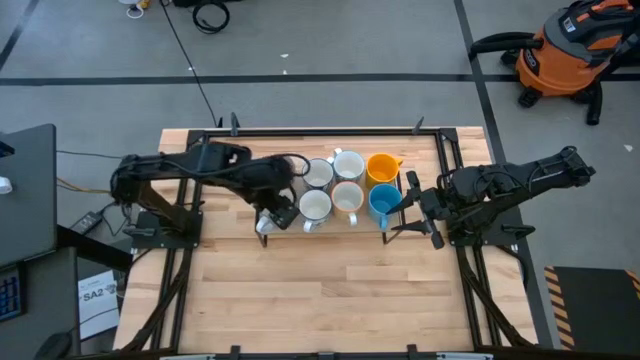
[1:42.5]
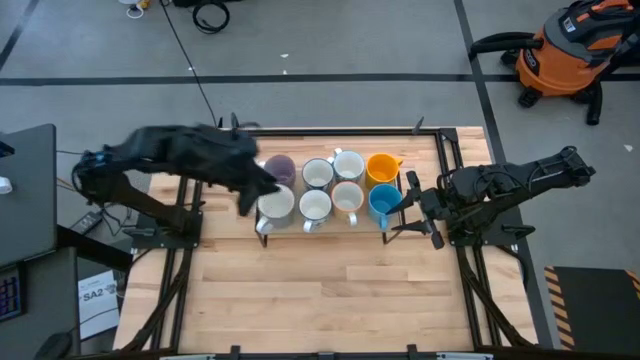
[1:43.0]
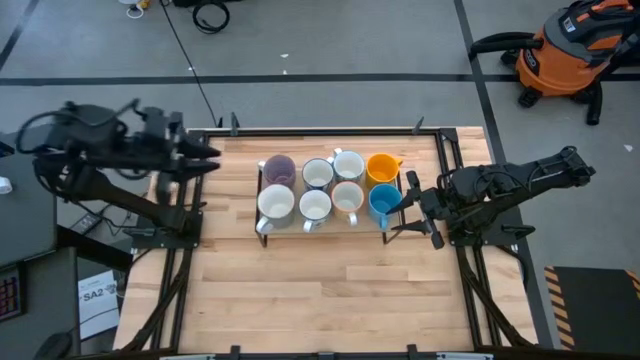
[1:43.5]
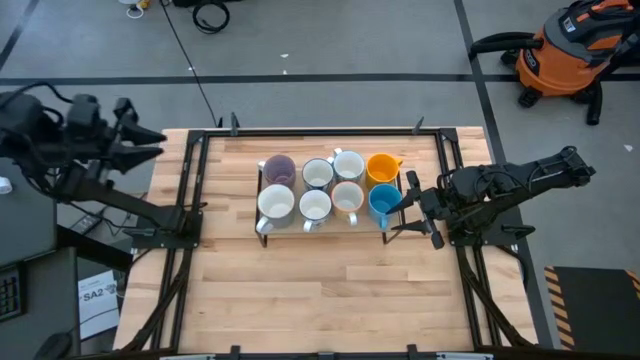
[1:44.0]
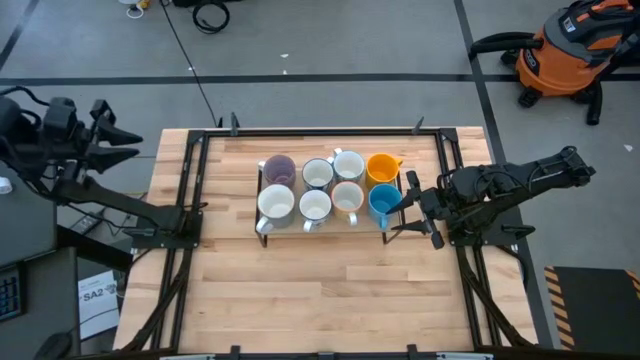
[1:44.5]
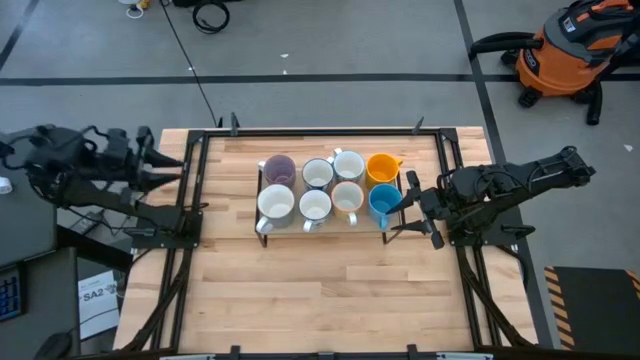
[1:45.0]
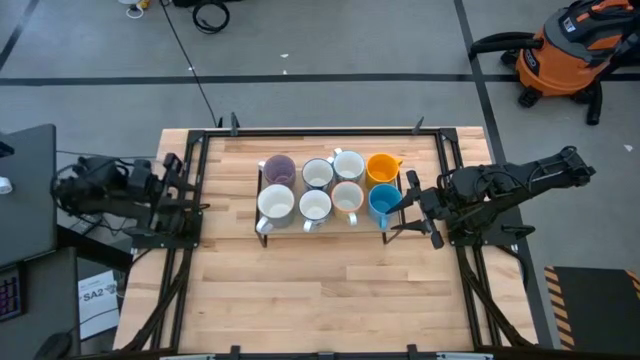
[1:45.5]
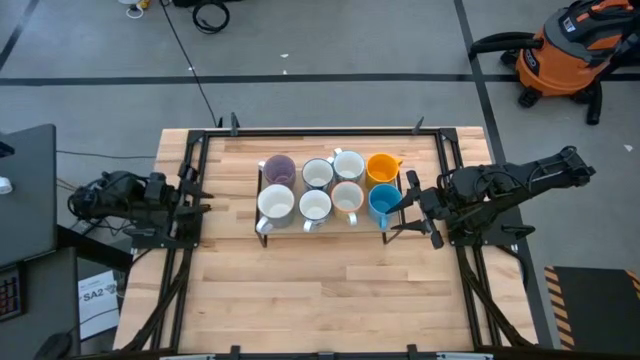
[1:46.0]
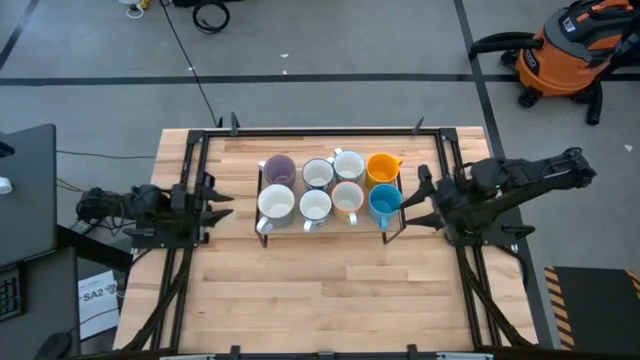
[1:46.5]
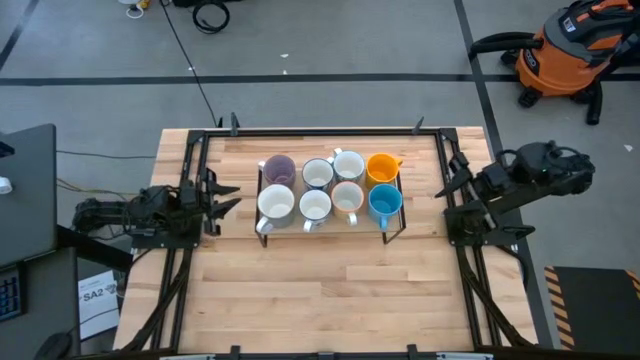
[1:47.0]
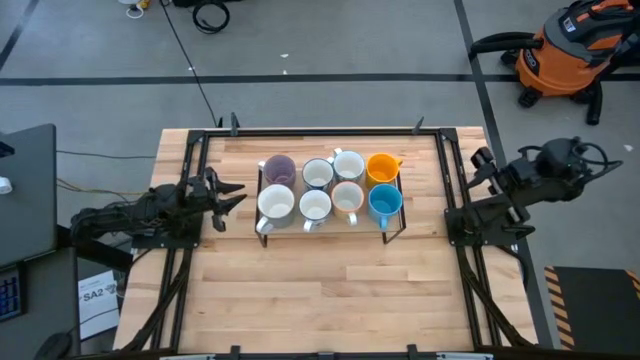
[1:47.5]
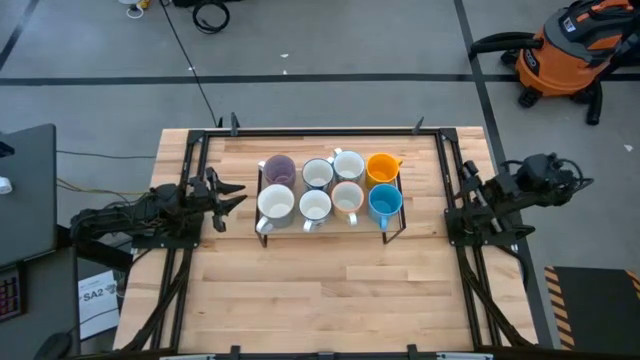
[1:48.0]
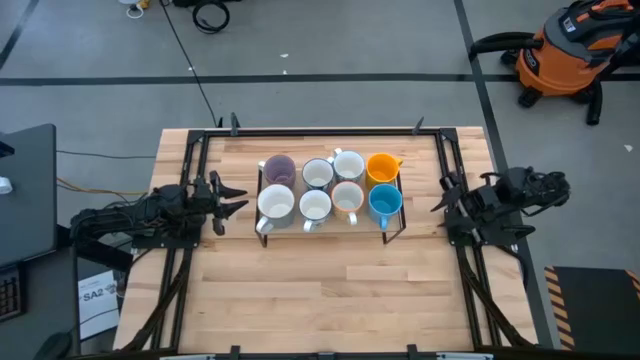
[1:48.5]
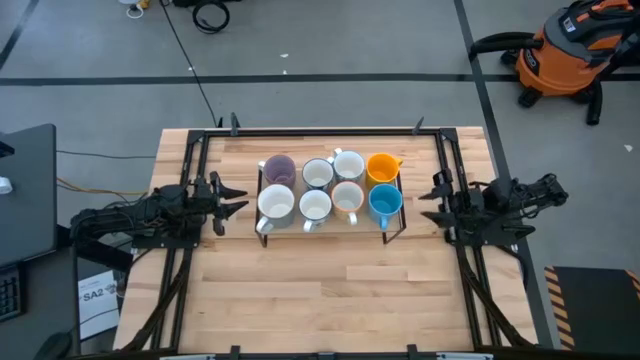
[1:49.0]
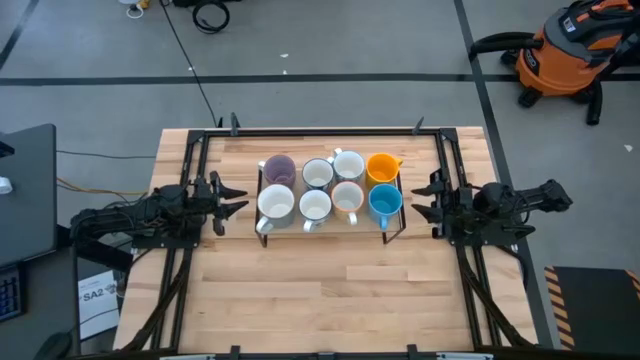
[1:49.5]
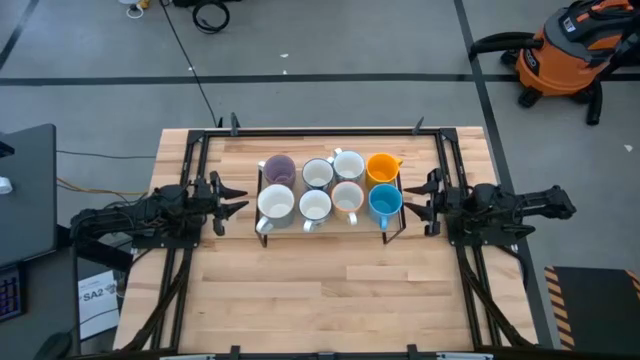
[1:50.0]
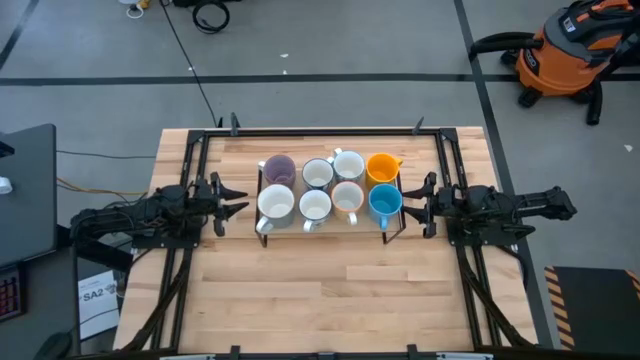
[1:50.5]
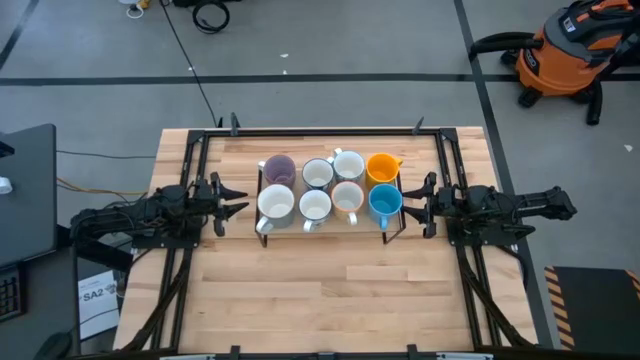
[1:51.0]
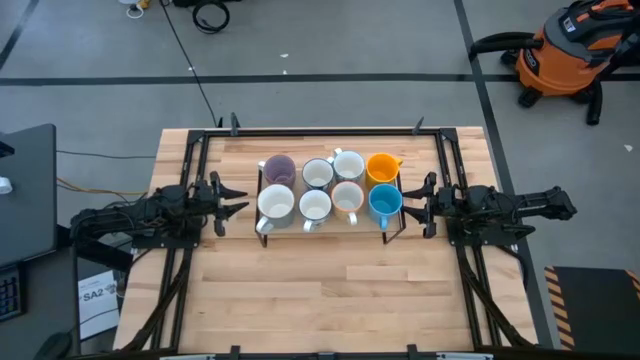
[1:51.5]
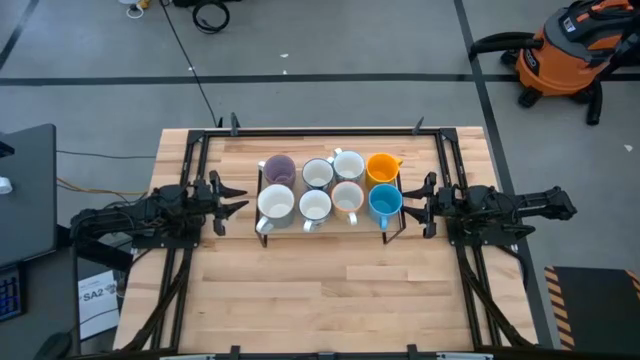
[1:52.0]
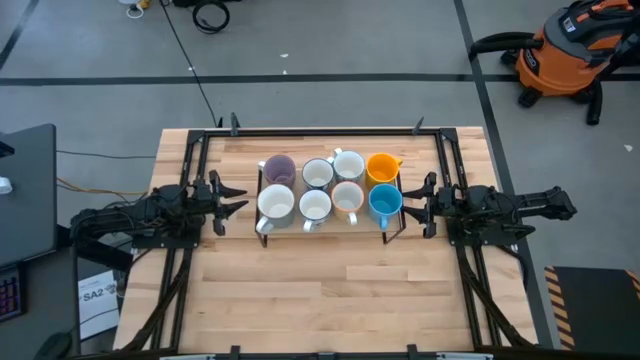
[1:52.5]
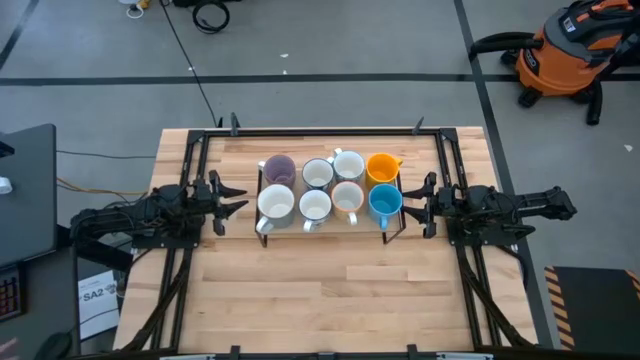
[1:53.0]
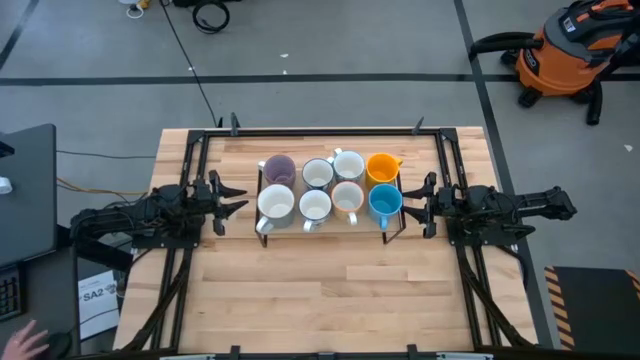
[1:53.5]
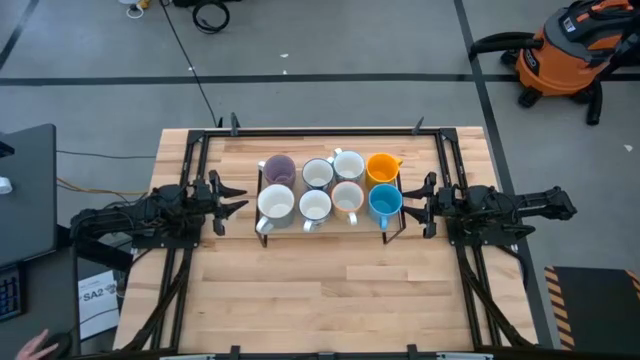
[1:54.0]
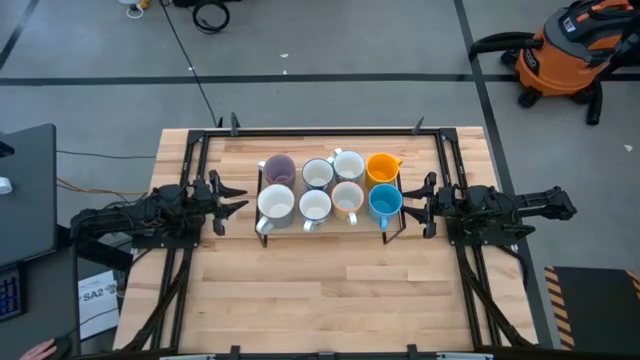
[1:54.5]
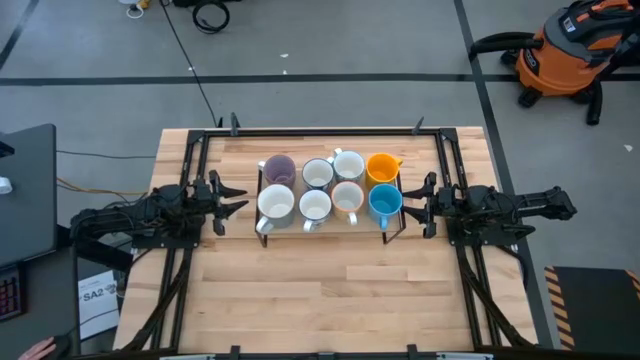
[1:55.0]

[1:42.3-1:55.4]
Task: Place coffee mugs
Return to Home Position

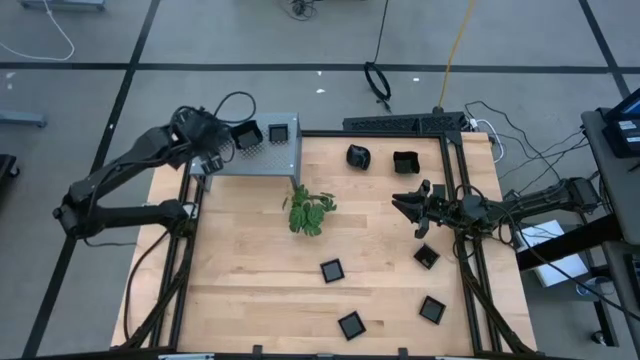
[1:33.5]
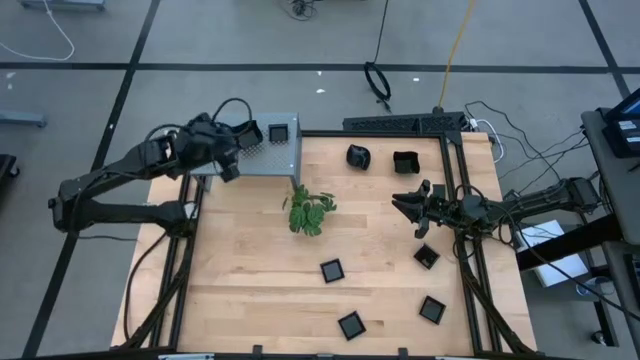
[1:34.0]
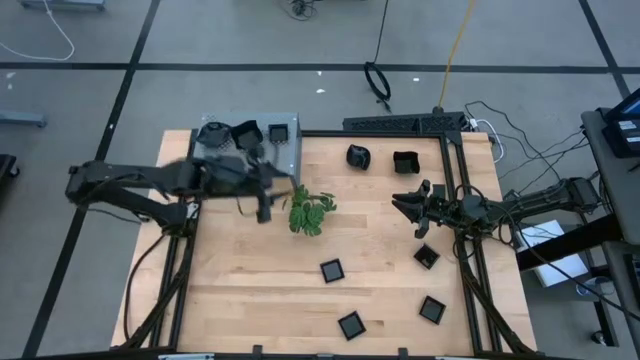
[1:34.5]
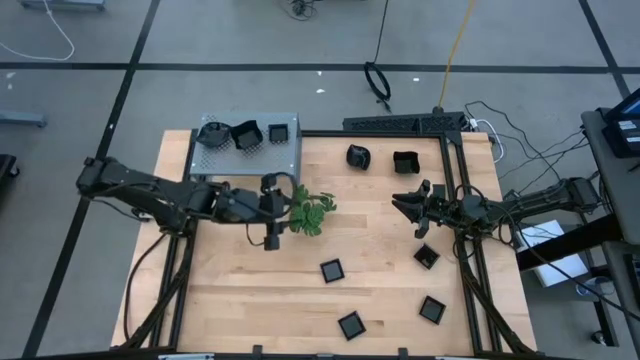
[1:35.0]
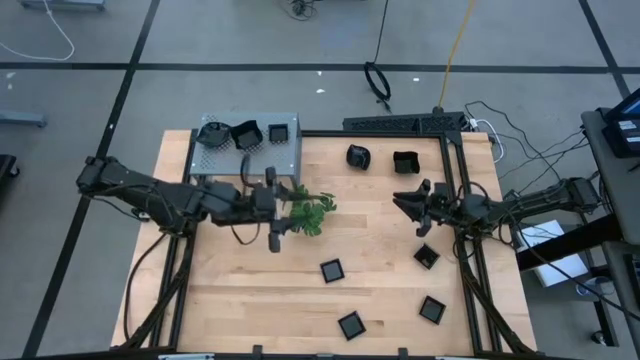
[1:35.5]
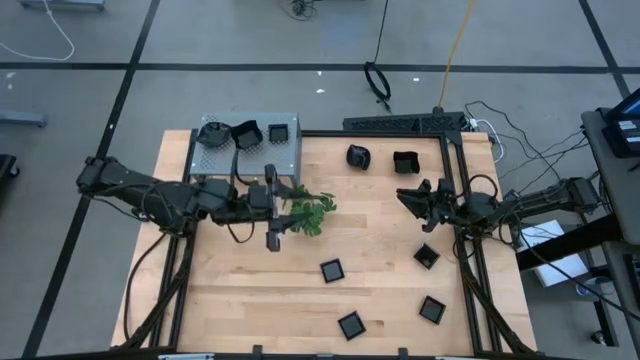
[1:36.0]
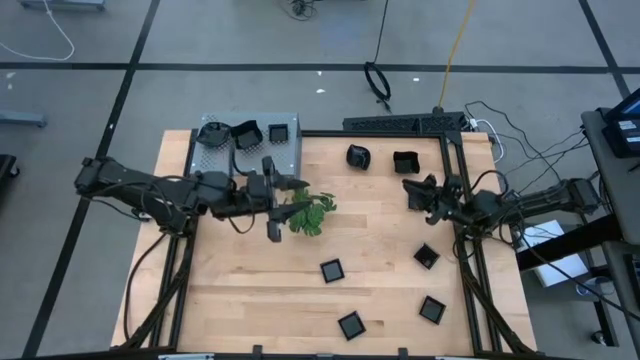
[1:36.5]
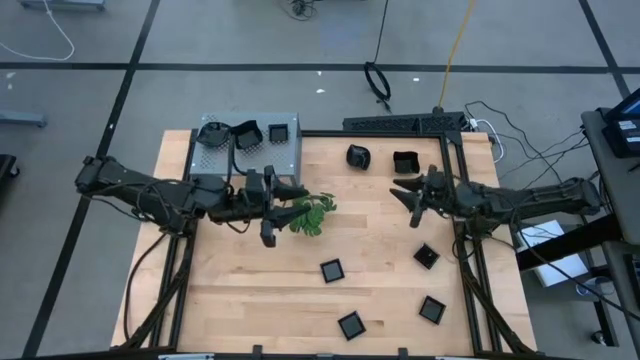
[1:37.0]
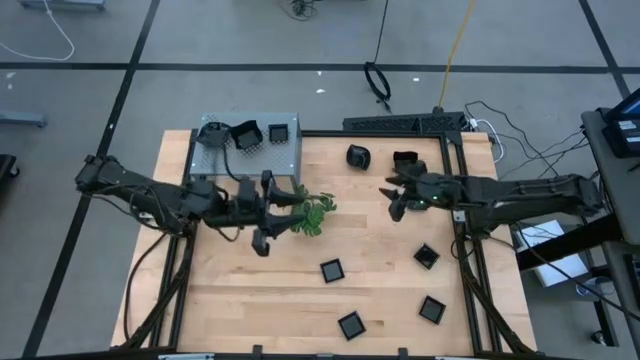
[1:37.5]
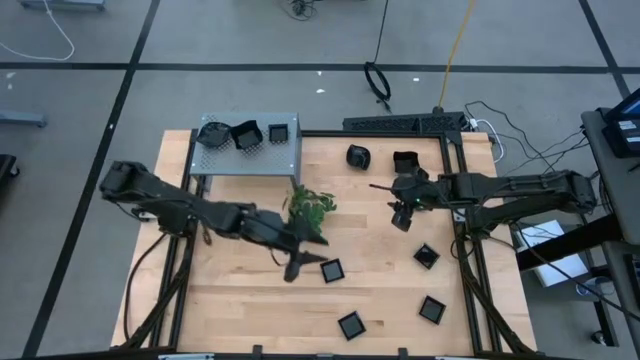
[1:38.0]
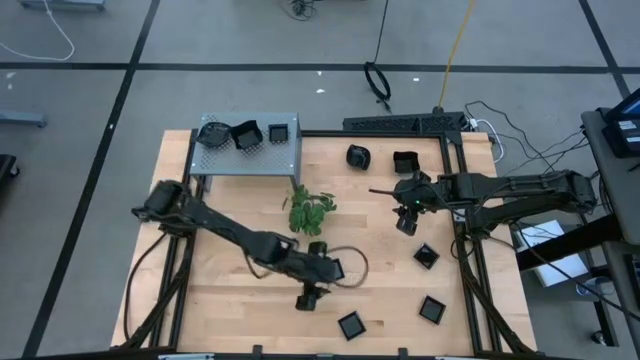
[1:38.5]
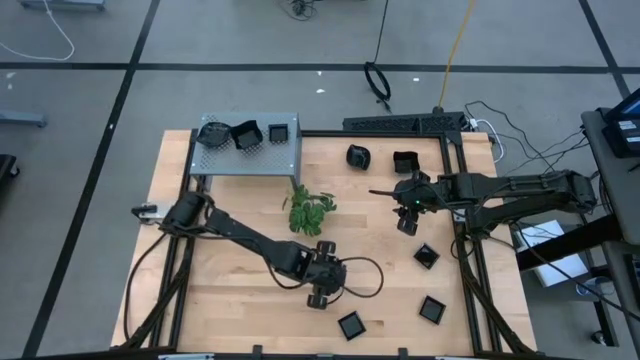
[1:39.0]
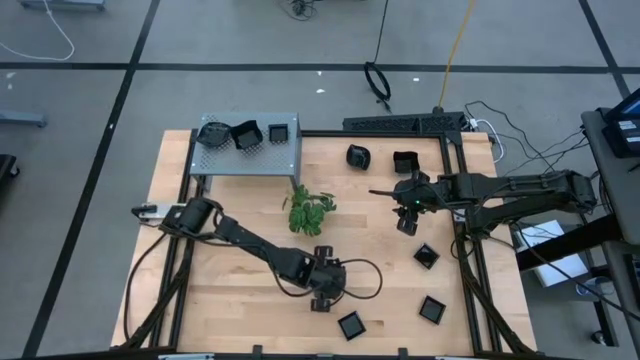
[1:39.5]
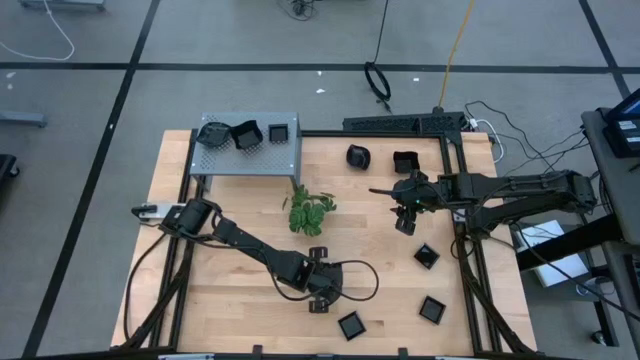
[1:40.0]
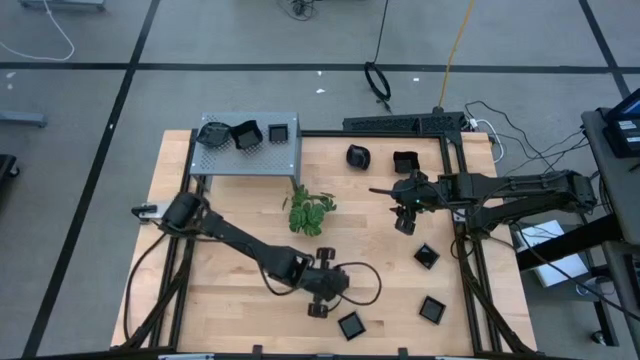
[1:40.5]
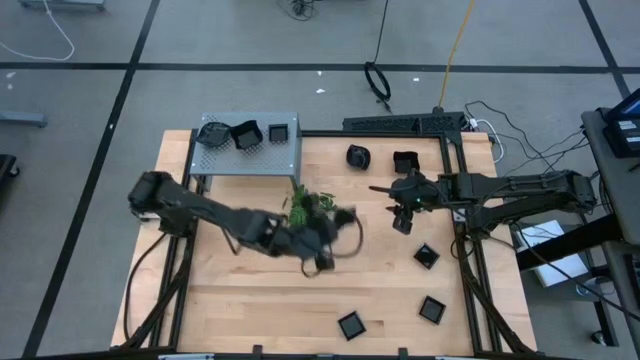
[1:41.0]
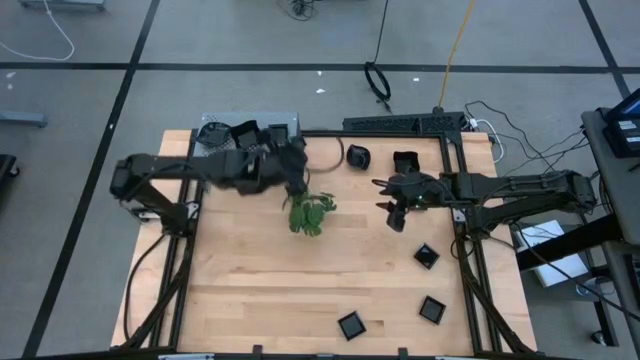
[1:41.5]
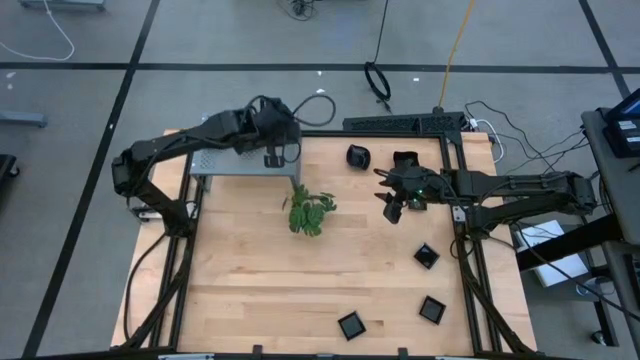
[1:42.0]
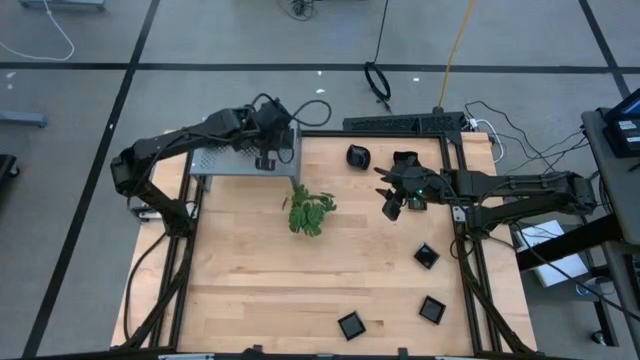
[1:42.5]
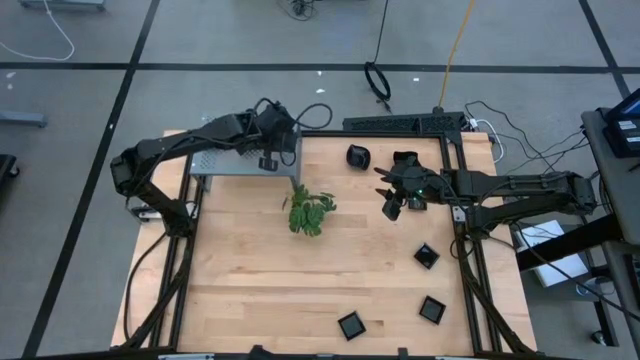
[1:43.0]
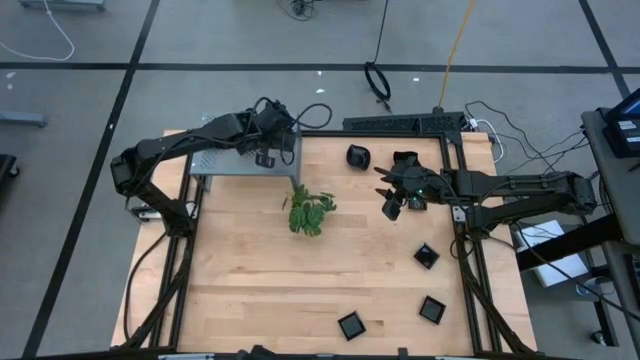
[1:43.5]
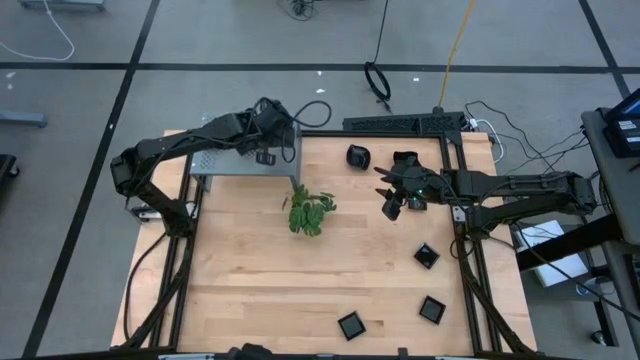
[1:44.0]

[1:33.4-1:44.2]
Task: Pick & Place Mini shaped plates
Stack the square plate on top of the square plate on the shelf
